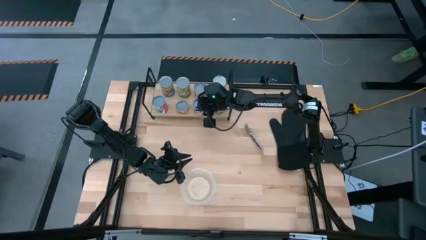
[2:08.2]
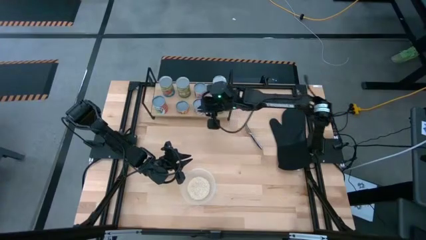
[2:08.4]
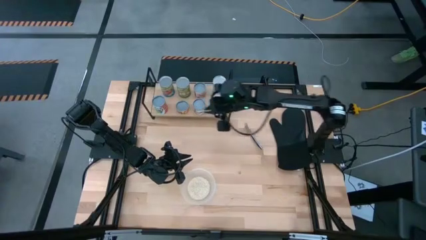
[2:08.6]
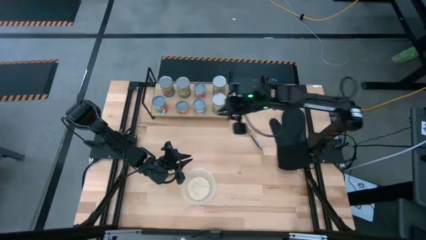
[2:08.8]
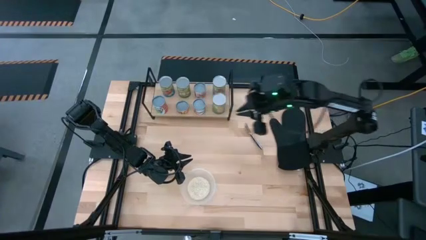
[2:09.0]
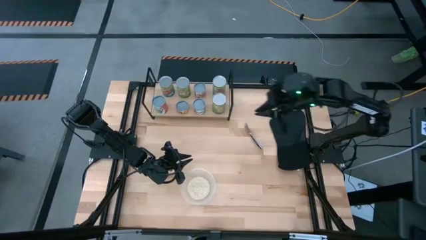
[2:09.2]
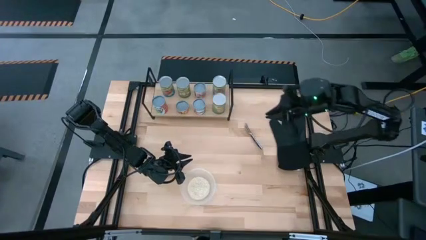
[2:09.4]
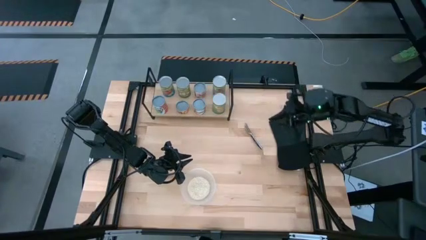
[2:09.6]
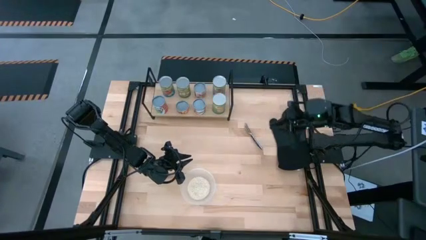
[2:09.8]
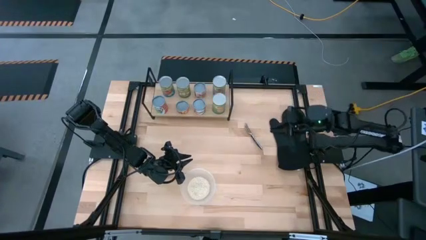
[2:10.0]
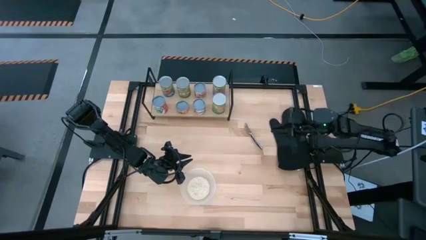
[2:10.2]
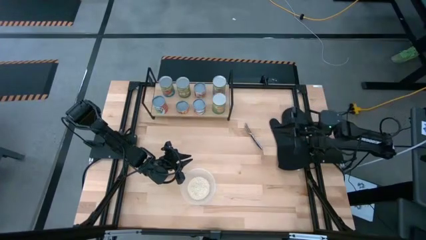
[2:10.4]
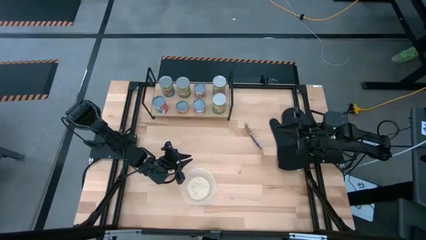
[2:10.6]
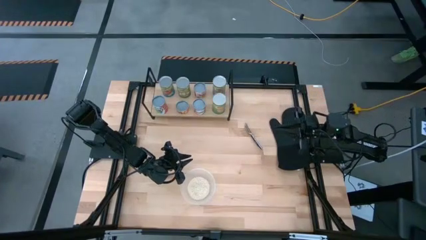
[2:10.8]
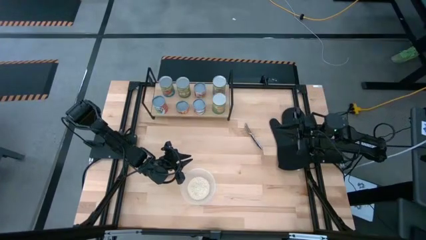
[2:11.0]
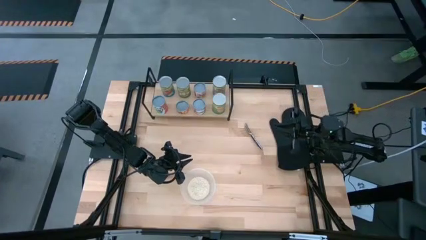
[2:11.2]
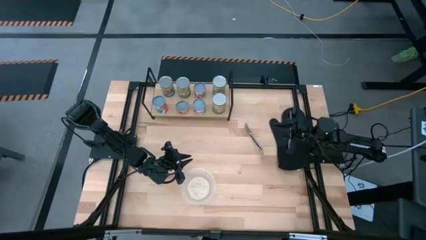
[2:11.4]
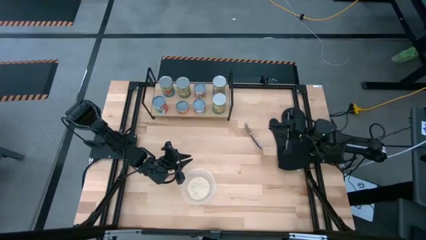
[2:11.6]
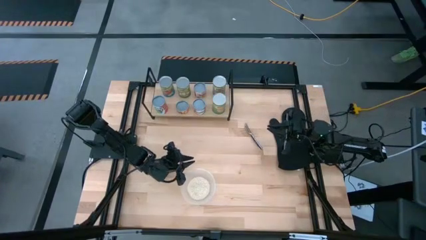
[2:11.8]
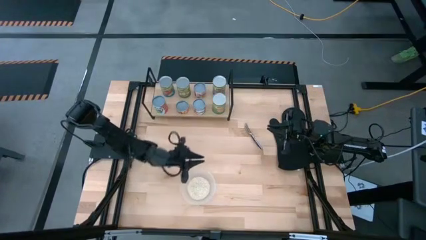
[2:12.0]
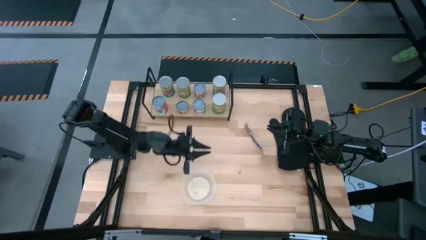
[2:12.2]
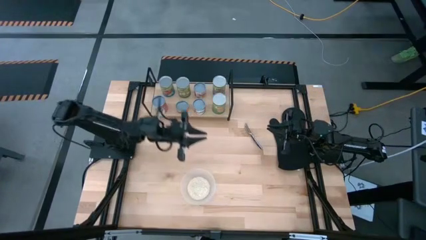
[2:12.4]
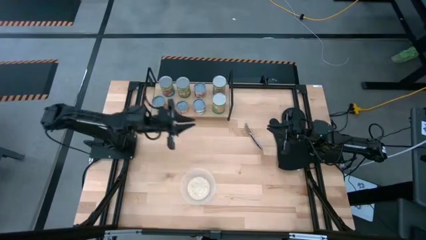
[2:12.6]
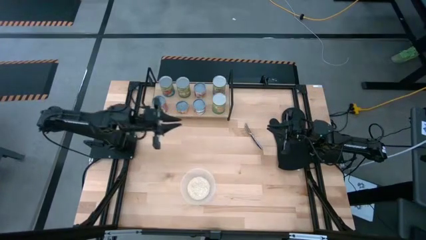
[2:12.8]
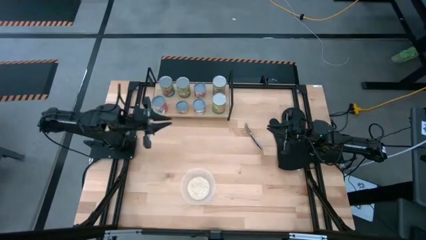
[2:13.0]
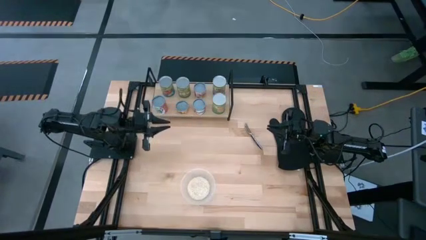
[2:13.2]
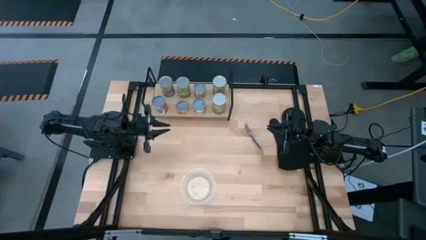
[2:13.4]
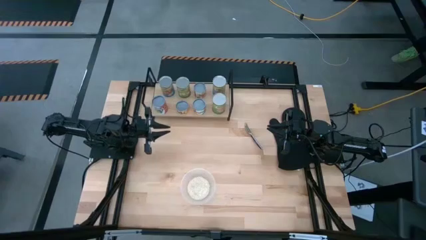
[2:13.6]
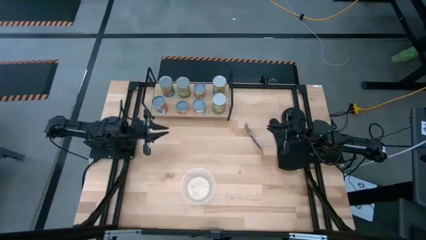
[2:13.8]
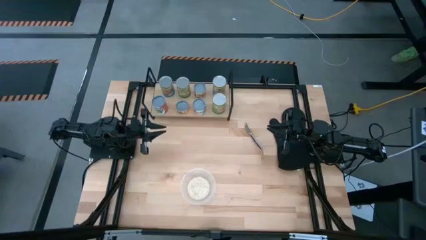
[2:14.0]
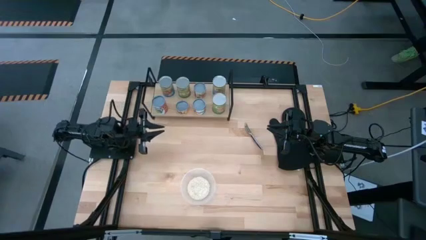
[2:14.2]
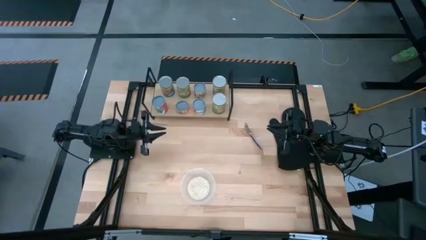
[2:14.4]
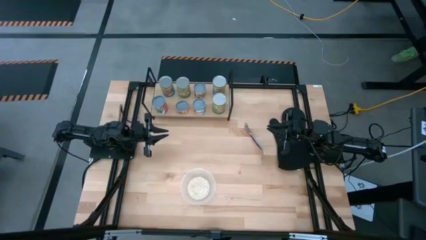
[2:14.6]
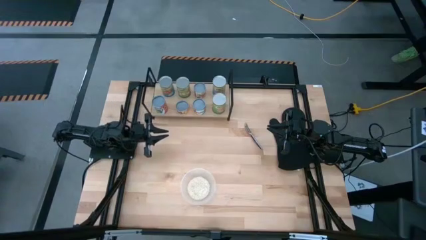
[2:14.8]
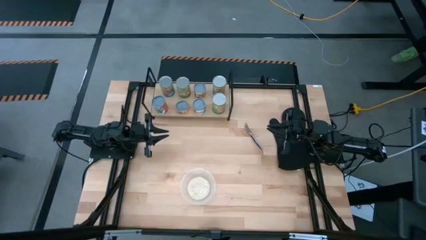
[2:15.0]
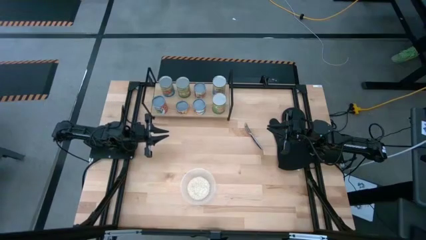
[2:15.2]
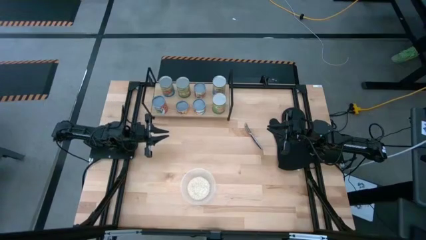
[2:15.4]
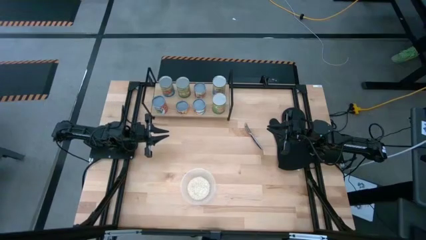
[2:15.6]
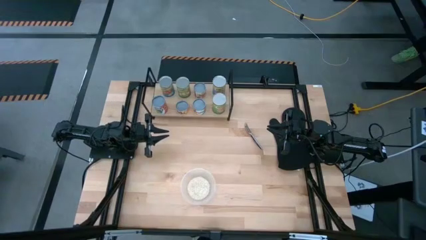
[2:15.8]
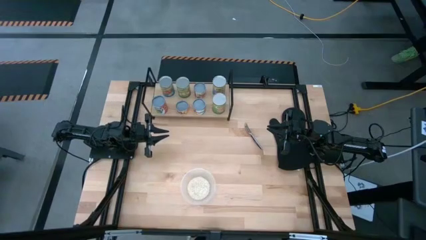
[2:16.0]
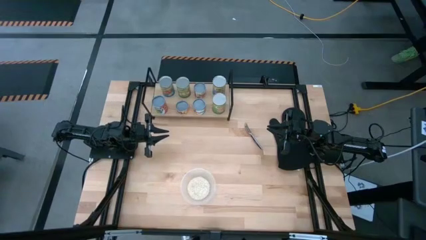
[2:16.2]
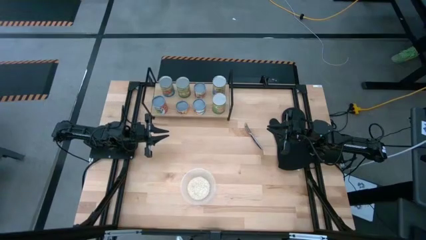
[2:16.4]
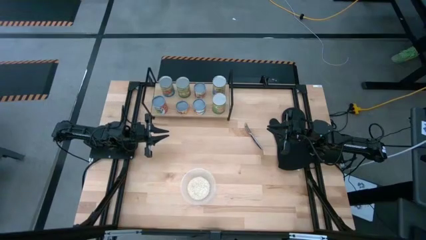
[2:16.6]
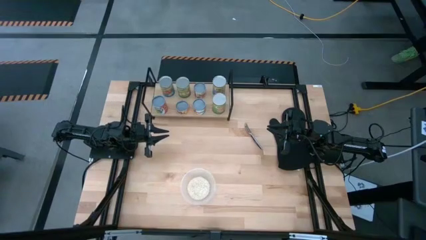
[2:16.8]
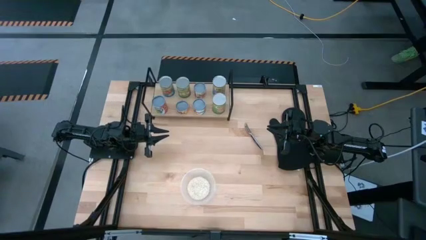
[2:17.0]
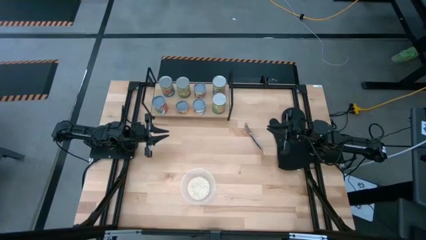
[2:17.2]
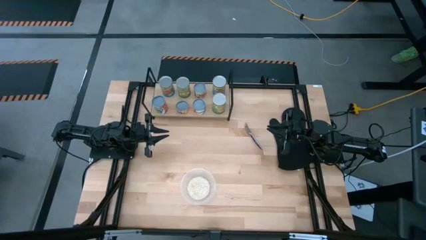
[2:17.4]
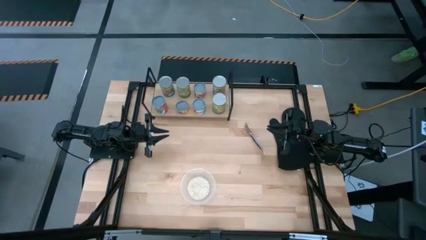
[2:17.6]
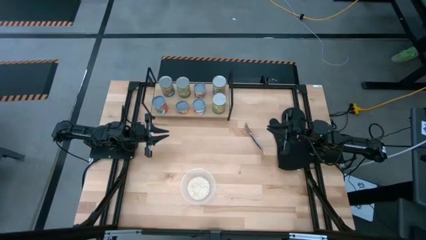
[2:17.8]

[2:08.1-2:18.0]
Task: Pick and place cans onto a shelf
Return to Home Position

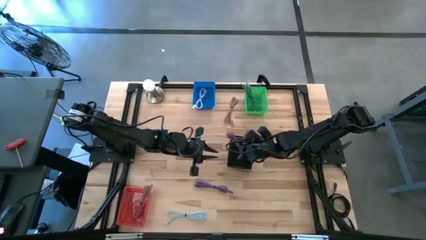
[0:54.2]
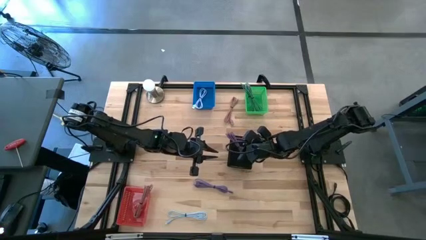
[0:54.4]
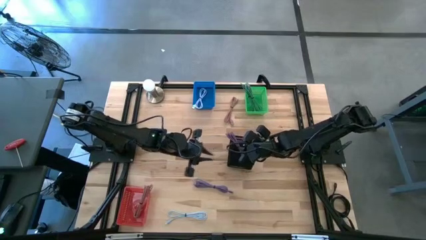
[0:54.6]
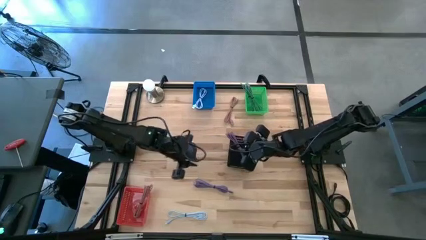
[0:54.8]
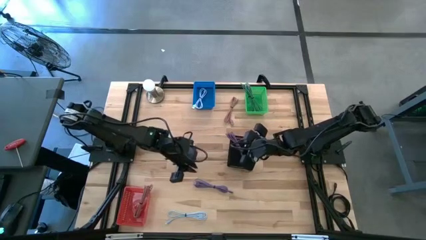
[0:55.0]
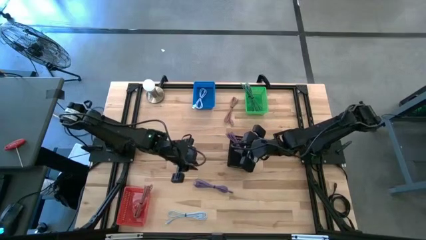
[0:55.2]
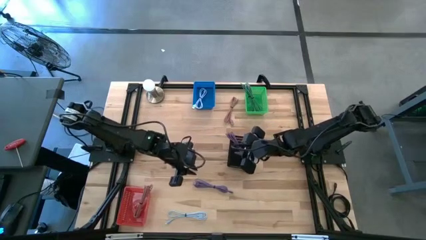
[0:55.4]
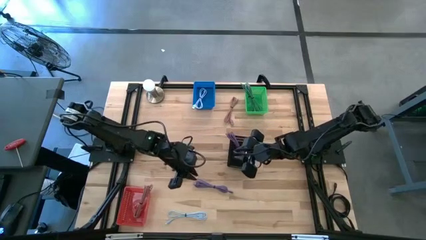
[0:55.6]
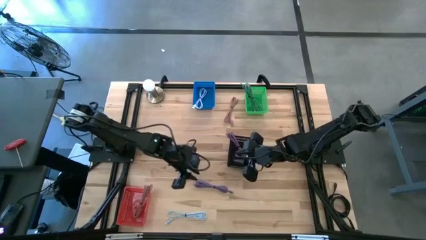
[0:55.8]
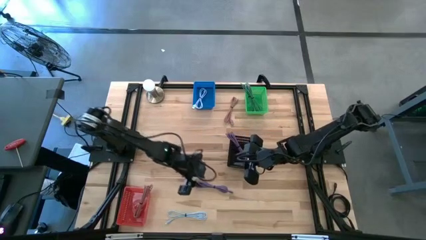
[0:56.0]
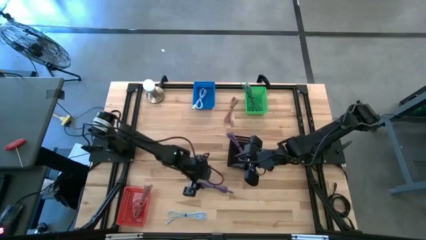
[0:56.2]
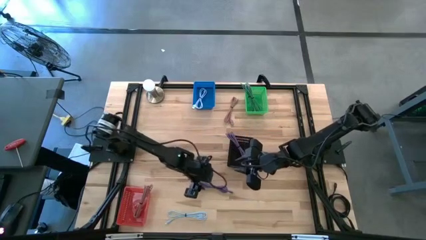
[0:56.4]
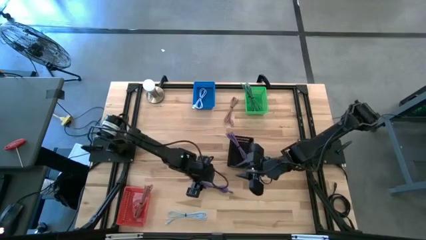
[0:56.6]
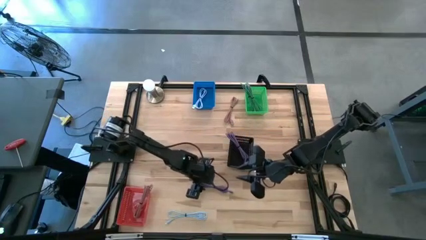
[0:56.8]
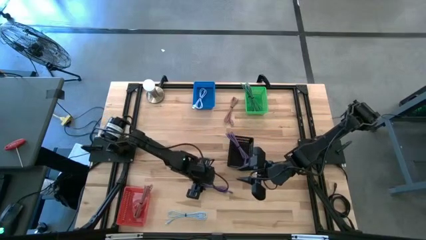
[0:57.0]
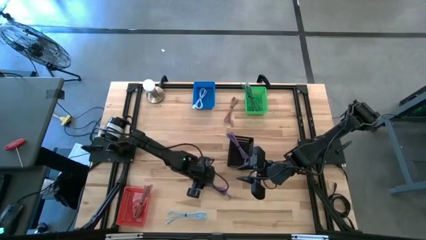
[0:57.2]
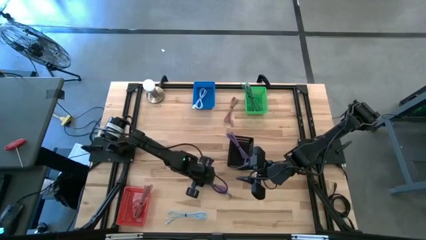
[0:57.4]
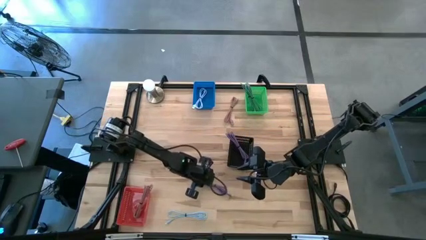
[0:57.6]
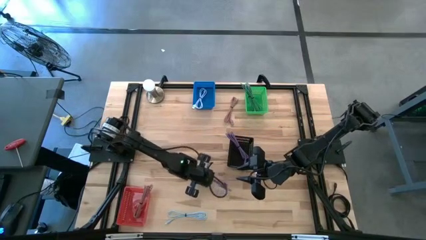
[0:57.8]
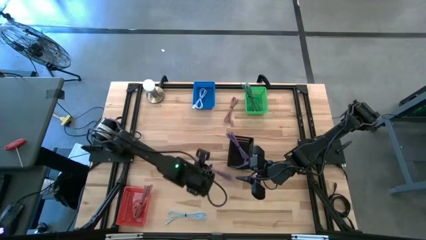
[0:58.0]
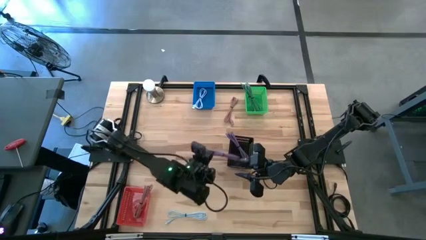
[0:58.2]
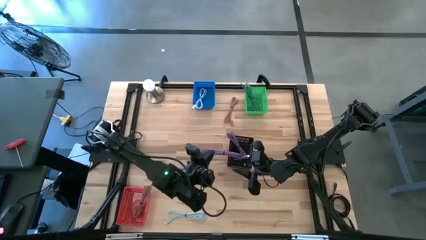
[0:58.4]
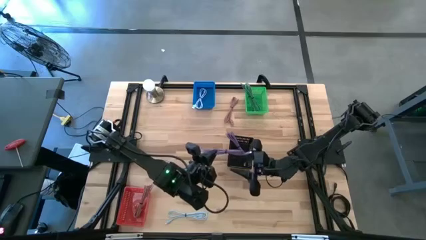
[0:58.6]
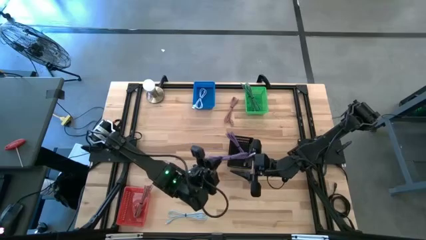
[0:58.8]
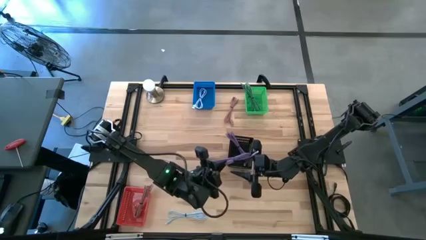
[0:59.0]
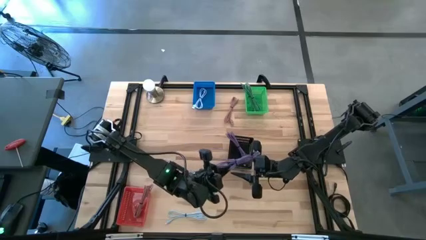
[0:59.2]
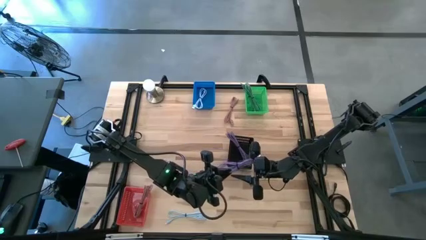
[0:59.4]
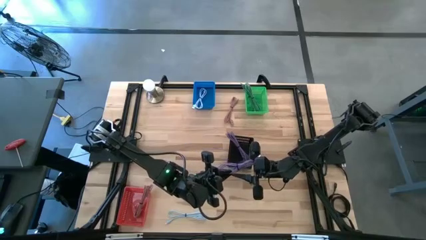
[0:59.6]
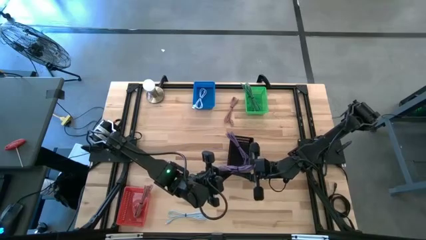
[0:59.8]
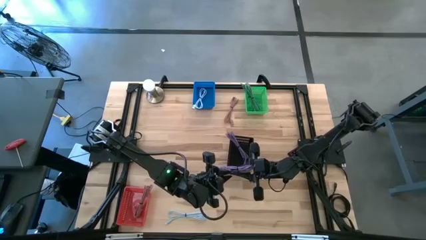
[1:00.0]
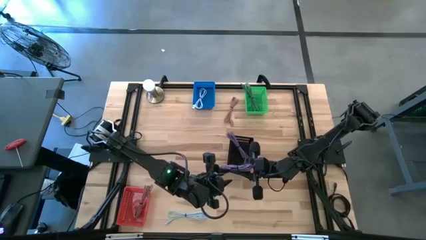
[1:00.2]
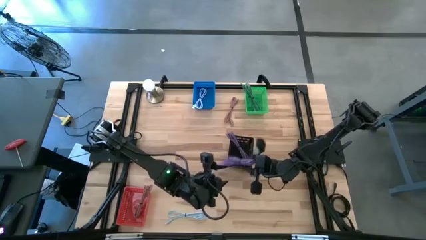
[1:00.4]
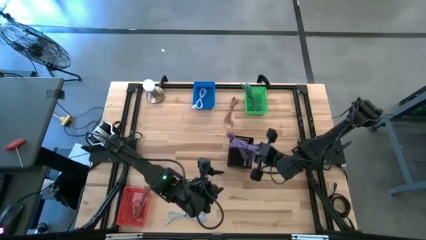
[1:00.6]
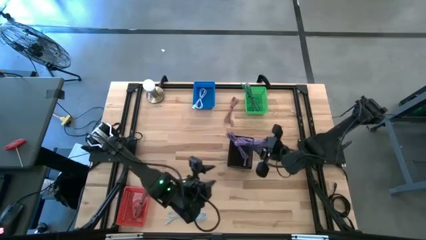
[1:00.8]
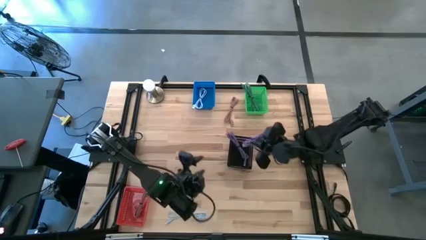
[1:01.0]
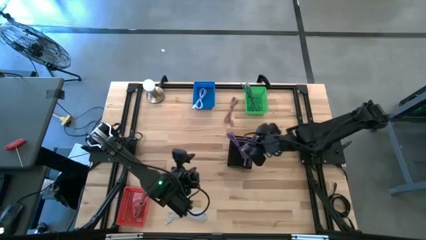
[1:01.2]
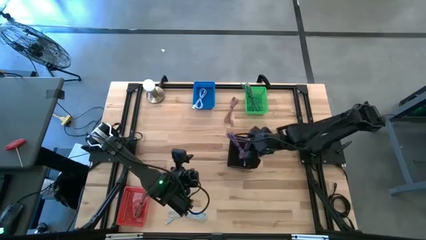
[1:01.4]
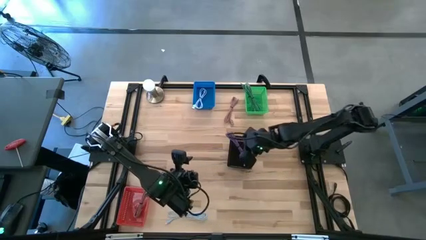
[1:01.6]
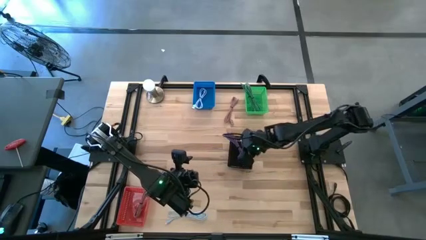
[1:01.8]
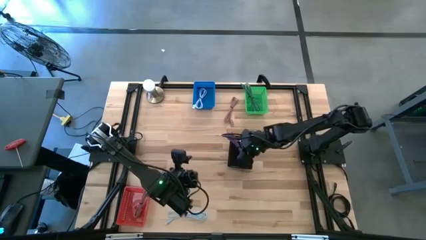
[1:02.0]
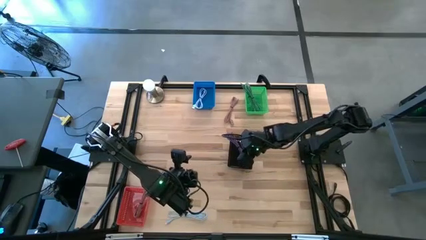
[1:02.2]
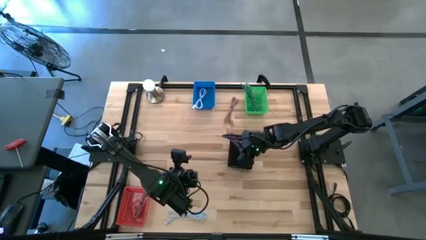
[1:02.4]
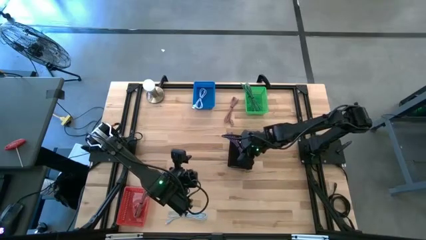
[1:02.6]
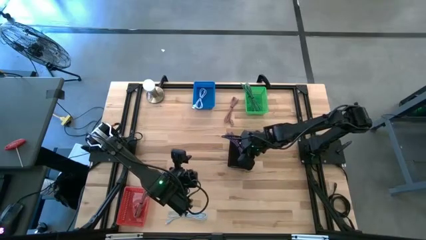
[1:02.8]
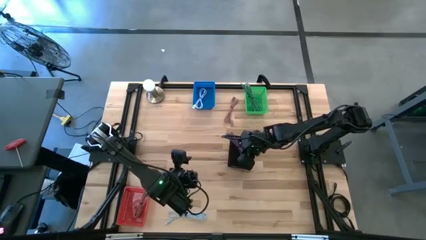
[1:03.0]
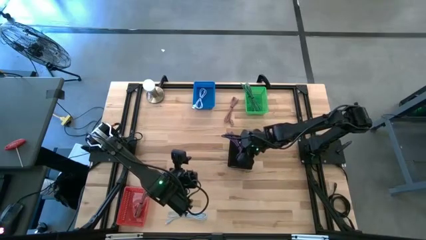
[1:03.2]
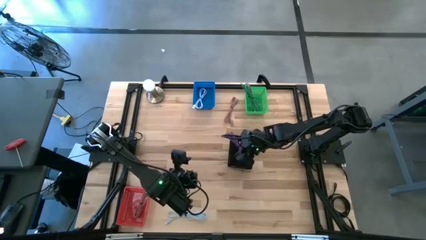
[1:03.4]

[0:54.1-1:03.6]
Task: Pick & Place USB Port
Put the purple charger cable into the black bin
